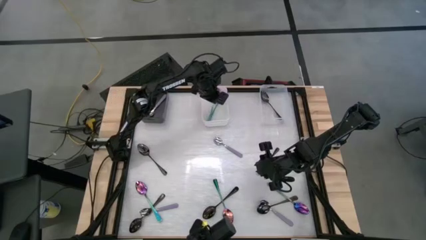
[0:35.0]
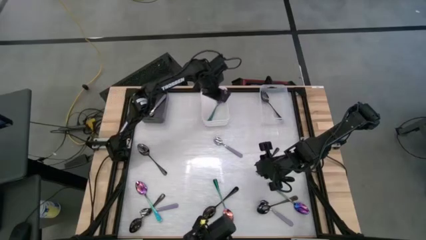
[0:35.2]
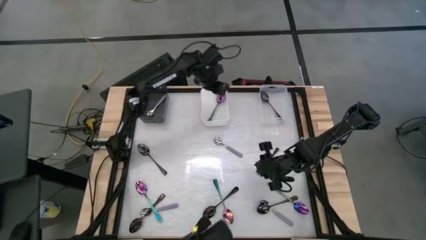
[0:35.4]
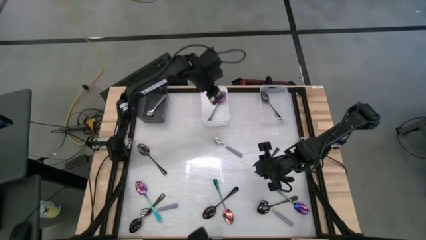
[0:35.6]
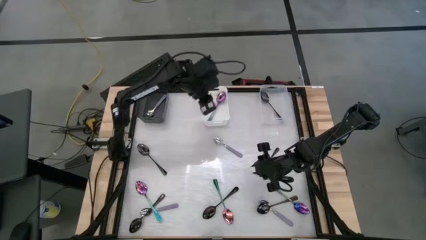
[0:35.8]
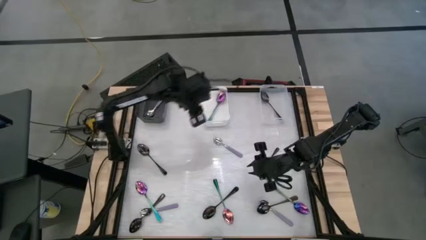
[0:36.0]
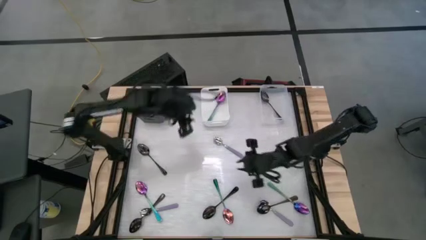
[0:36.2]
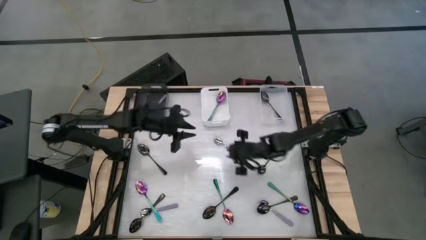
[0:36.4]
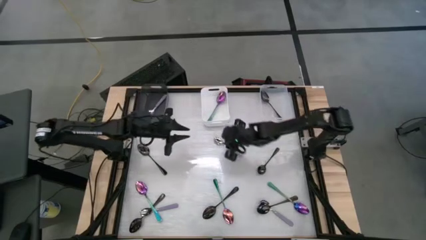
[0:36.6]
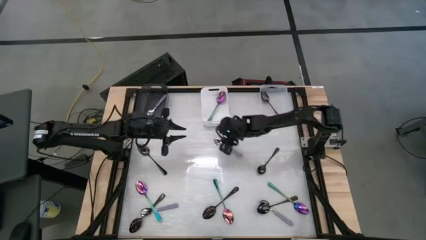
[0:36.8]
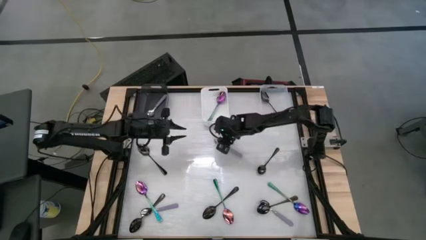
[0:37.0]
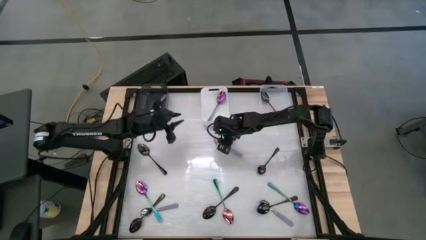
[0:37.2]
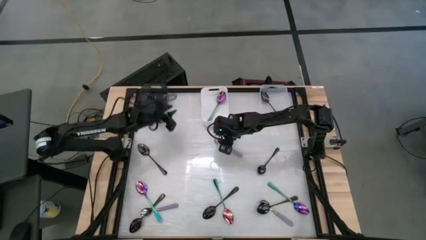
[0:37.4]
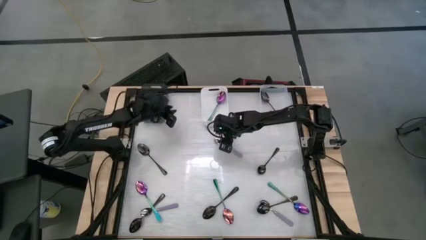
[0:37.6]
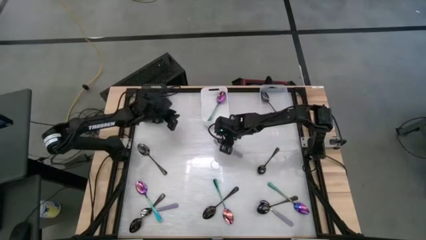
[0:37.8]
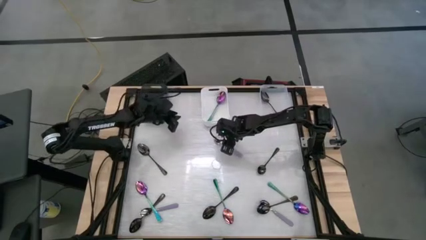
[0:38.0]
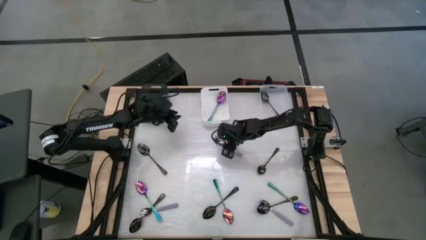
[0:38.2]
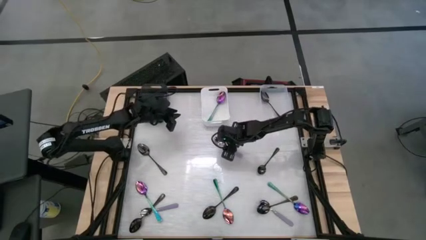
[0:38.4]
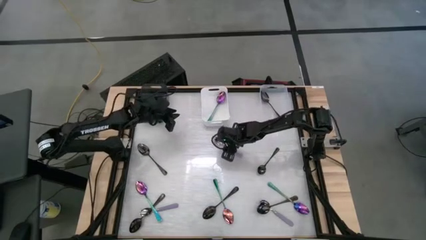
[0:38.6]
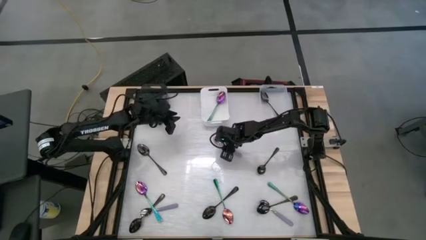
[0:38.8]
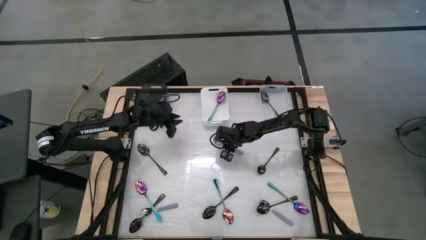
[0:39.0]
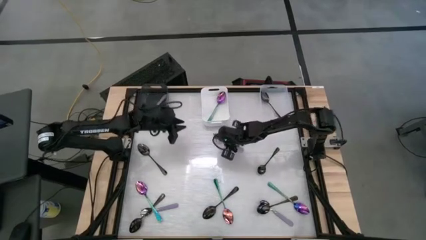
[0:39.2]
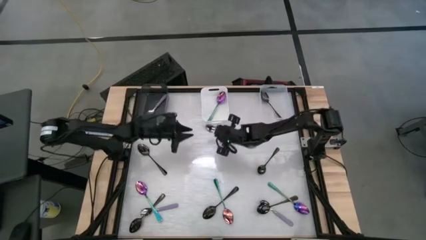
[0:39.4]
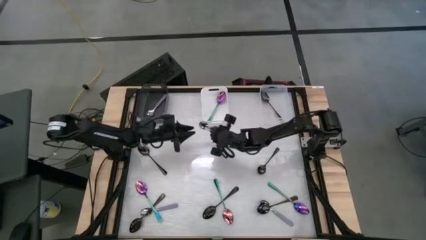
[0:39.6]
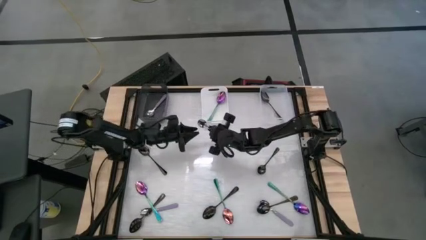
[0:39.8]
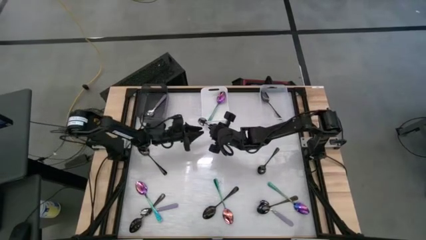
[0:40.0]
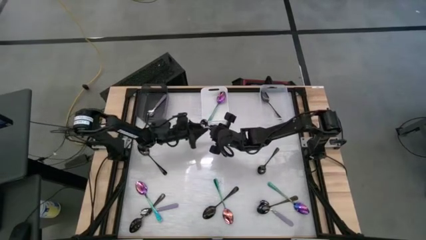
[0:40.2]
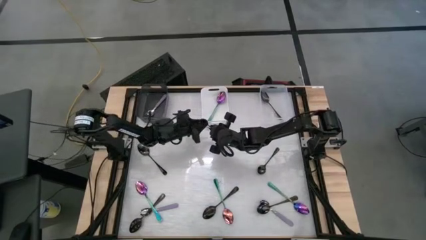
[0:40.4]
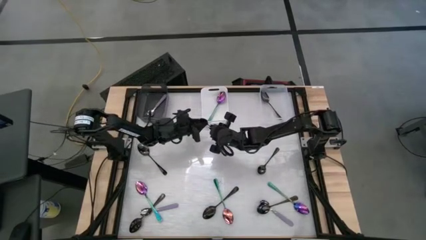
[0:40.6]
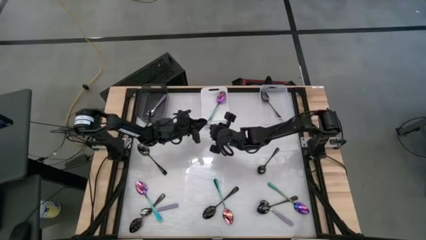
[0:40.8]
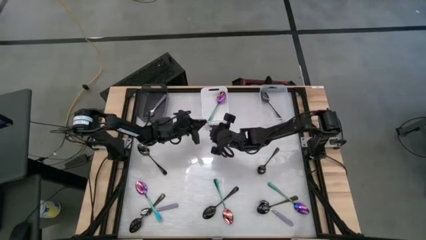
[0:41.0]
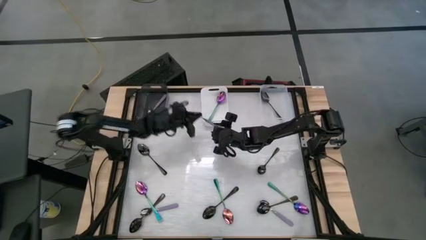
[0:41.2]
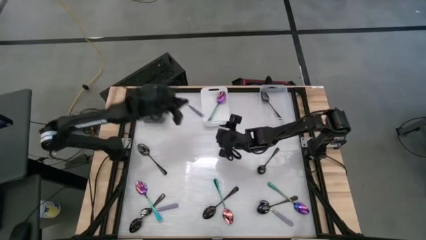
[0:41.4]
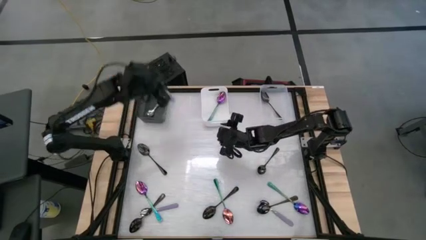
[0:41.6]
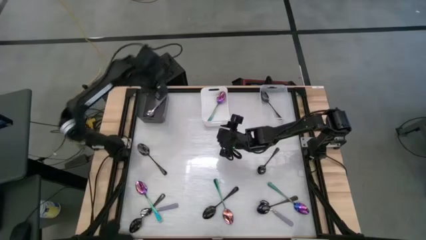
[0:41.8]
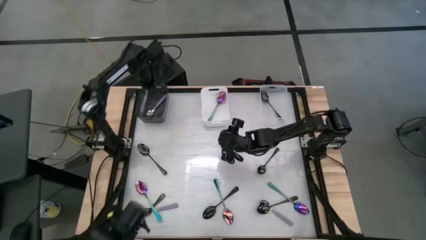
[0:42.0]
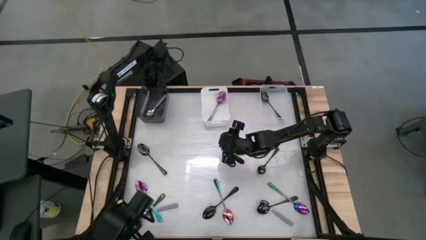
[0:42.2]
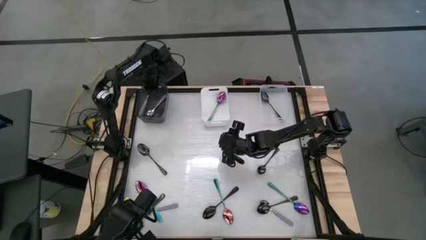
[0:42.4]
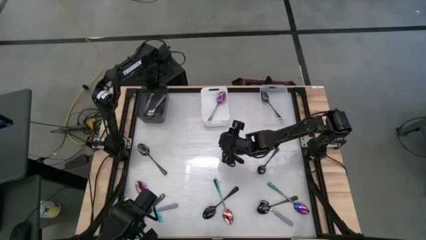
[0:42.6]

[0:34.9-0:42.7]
Task: Sort silverware by color (type)
Put the purple spoon into the transparent black bin

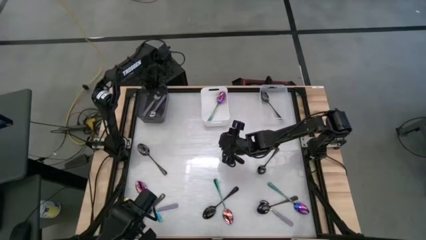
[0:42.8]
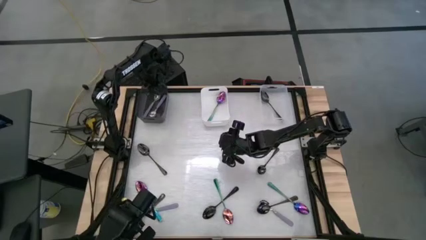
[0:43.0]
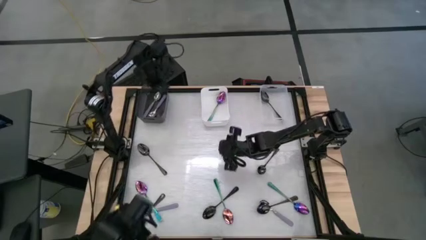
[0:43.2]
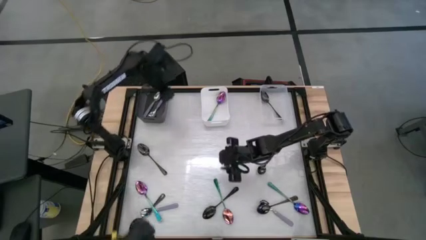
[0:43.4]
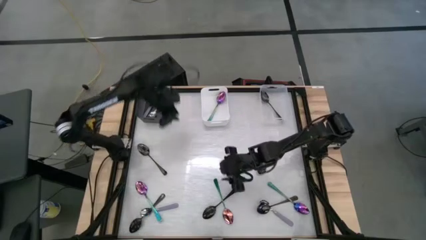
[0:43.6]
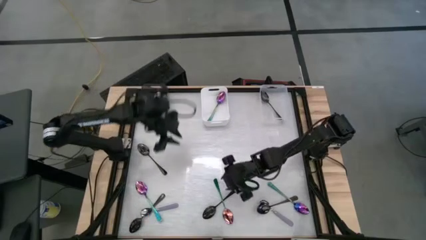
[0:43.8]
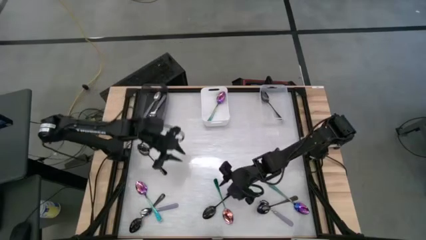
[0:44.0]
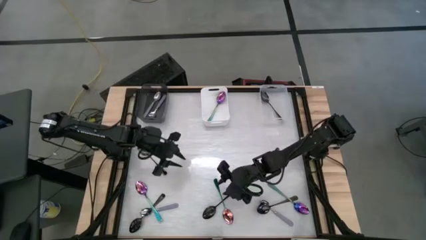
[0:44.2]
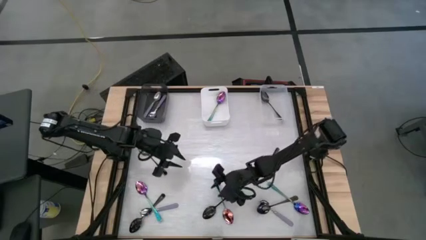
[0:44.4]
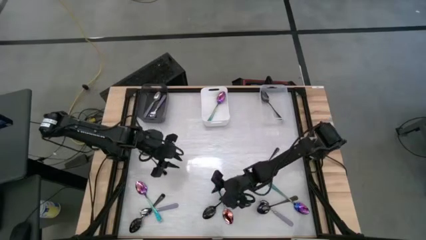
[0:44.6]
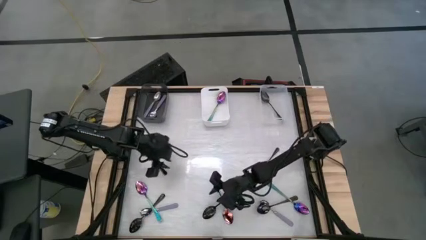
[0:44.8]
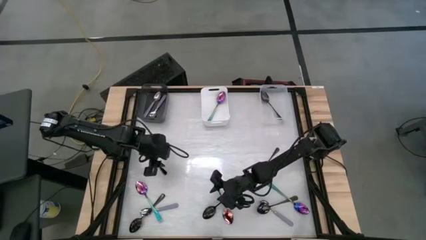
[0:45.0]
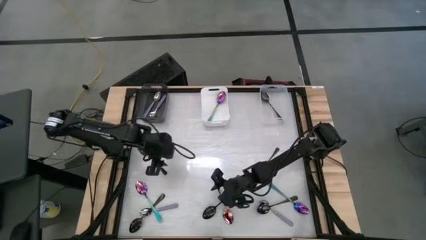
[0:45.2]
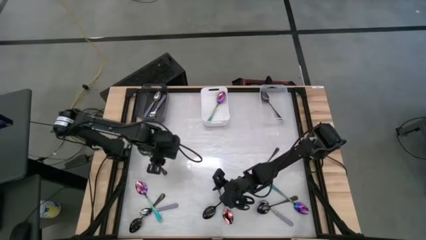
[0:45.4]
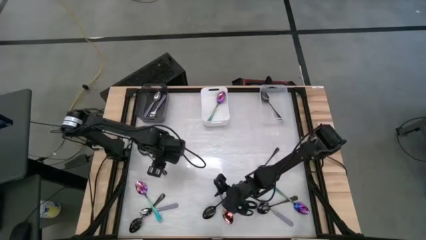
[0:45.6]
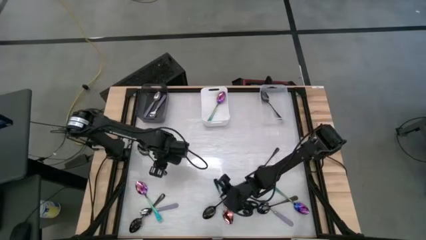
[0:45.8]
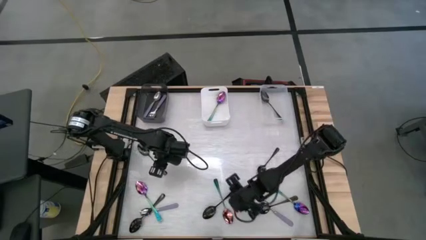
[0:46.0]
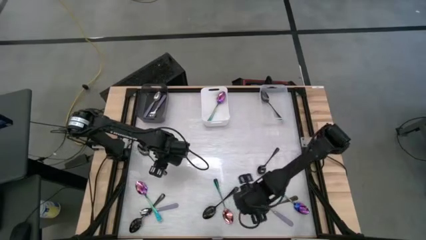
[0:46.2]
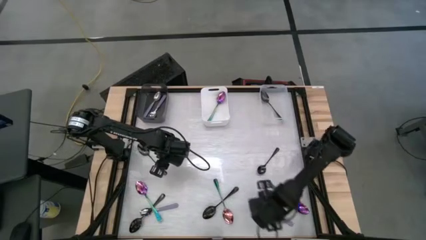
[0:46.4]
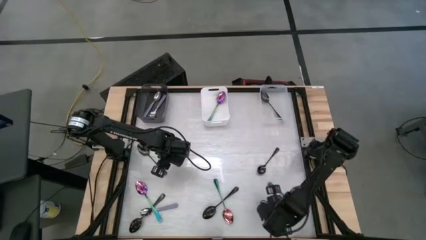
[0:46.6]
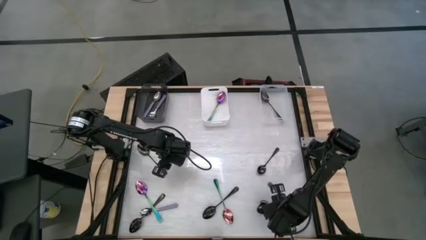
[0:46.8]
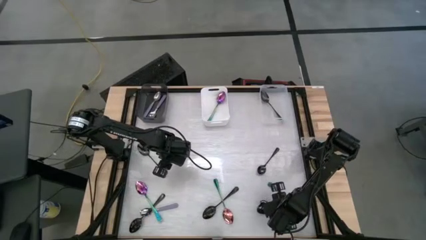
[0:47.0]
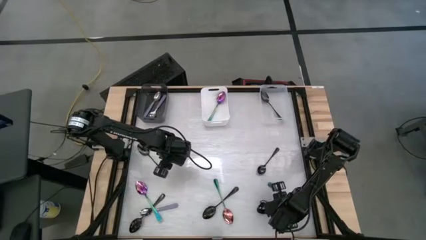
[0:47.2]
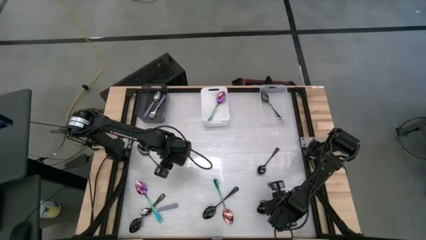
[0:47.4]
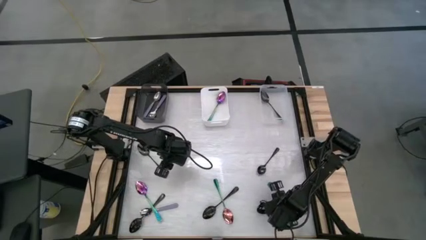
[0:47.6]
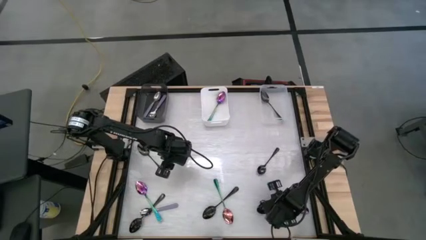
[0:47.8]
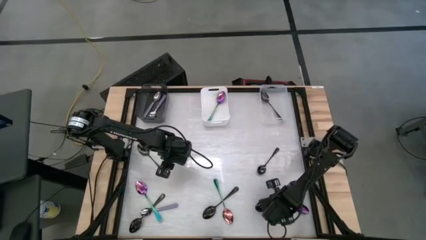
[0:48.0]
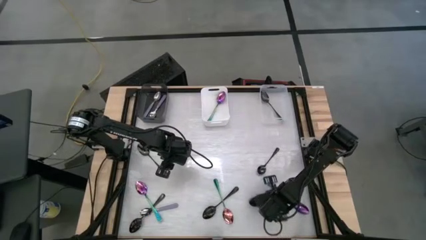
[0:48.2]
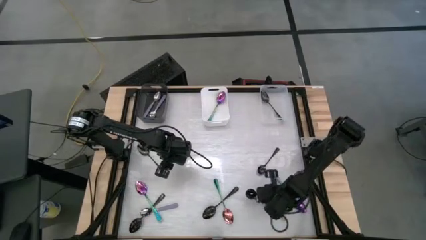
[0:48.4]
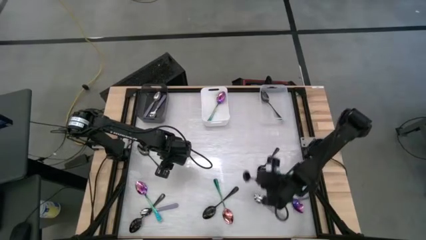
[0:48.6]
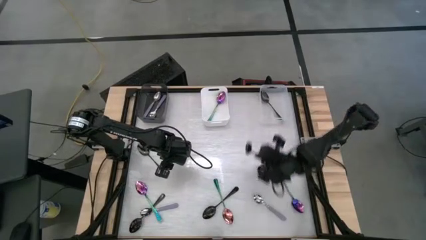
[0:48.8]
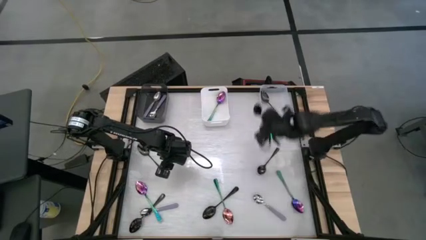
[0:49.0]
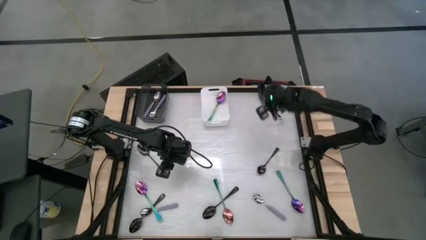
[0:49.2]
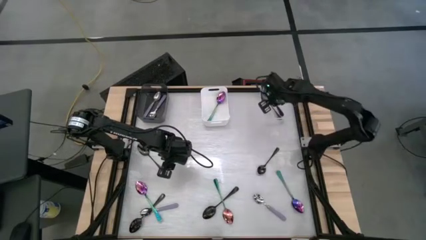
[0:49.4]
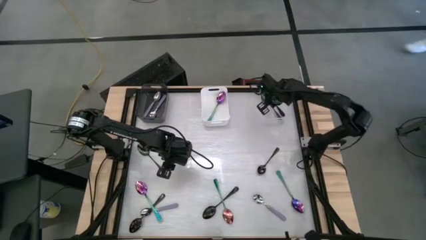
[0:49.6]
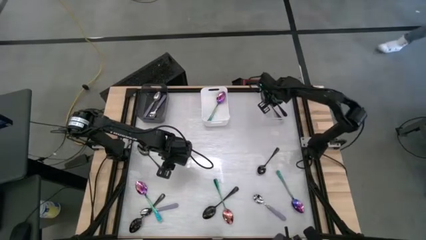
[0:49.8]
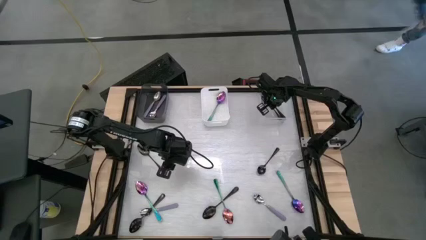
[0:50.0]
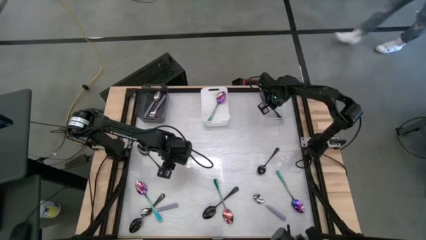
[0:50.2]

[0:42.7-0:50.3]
Put the black spoon into the transparent bin

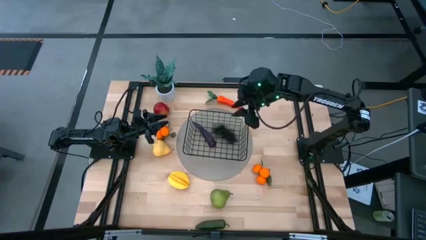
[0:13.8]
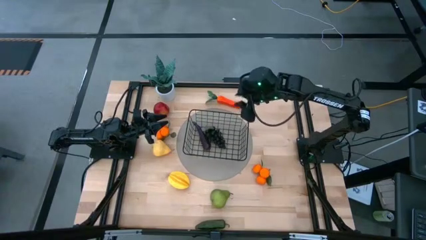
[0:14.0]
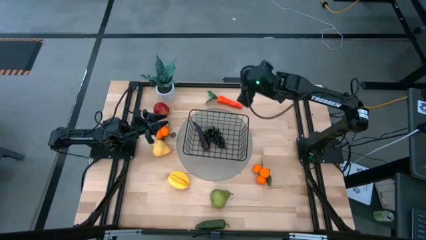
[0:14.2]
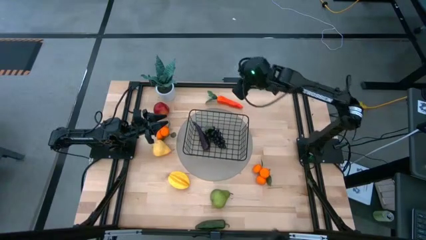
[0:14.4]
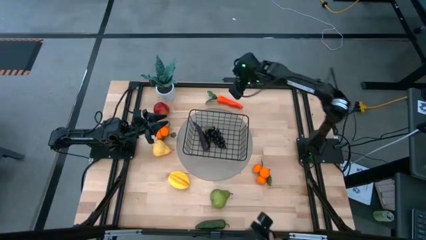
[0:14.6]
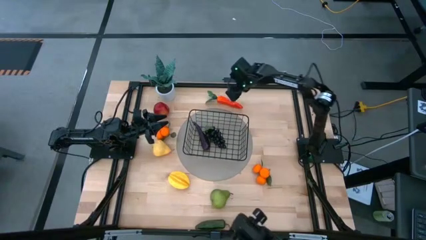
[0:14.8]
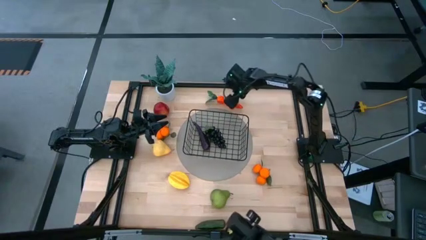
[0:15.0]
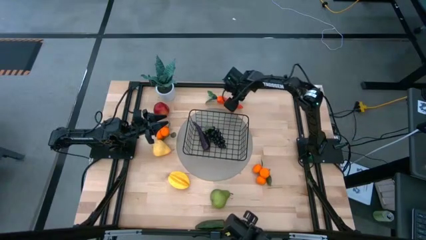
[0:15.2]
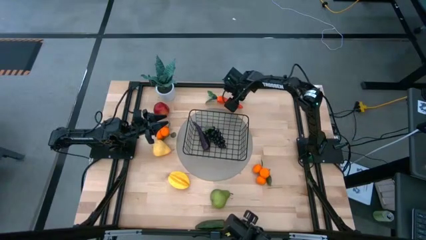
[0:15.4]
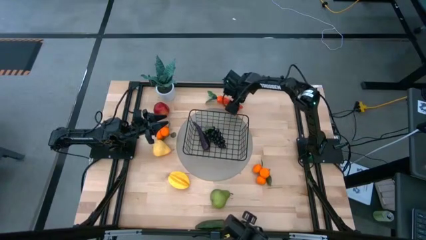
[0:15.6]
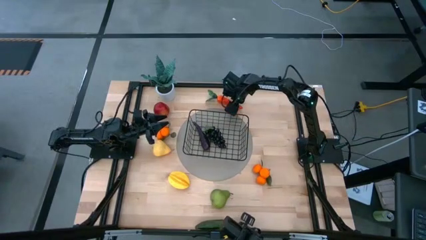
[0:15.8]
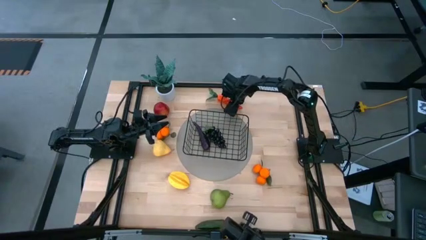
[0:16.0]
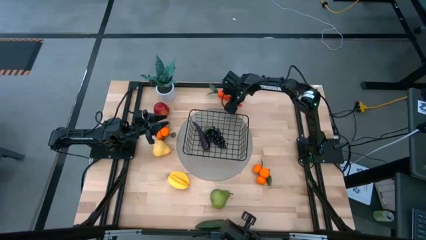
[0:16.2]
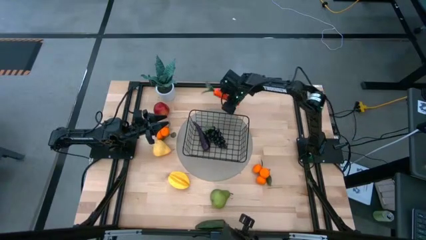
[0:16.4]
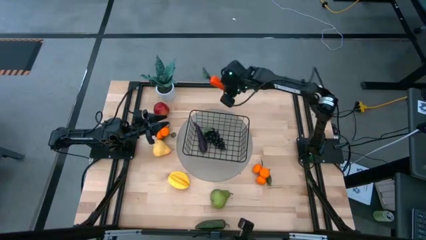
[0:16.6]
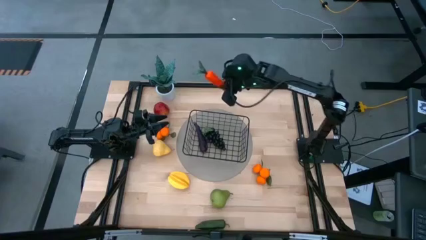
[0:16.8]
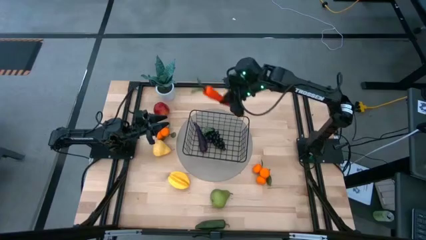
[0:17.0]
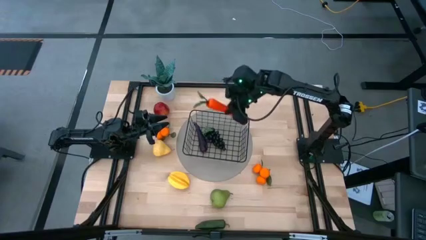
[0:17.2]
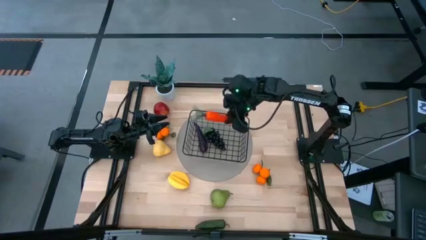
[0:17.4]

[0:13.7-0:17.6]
Task: Build produce basket
Put the orange carrot into the black wire basket
